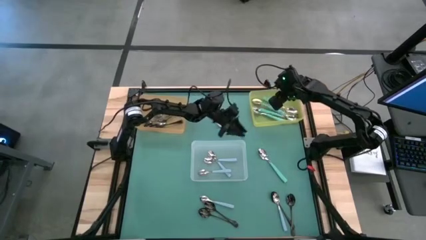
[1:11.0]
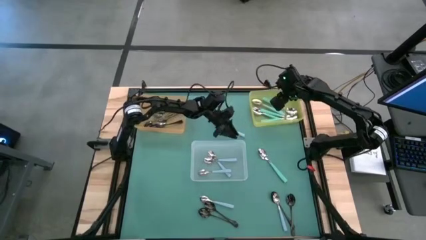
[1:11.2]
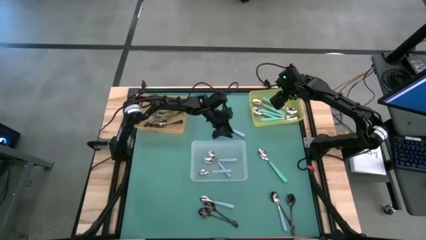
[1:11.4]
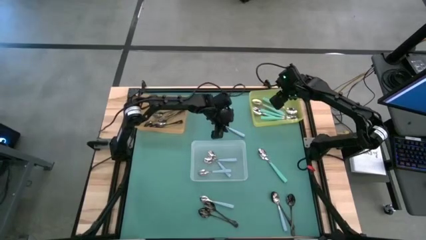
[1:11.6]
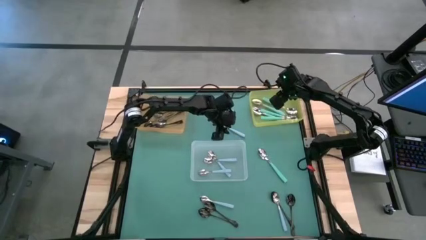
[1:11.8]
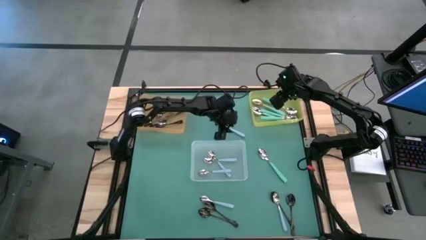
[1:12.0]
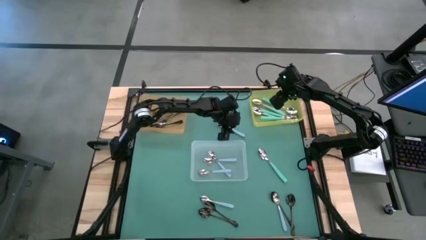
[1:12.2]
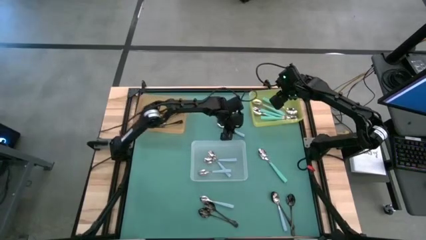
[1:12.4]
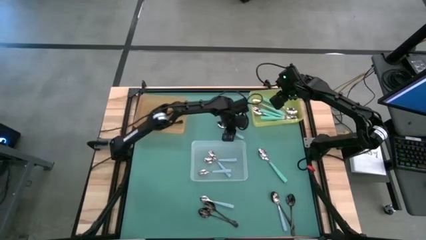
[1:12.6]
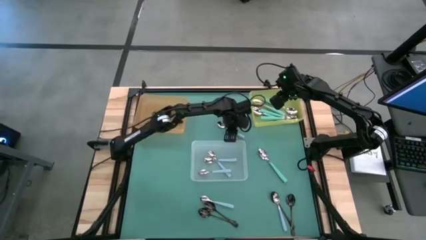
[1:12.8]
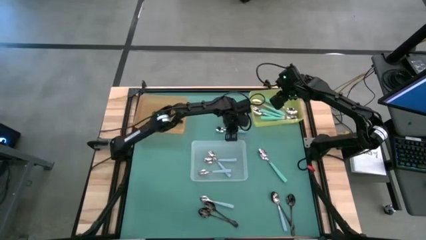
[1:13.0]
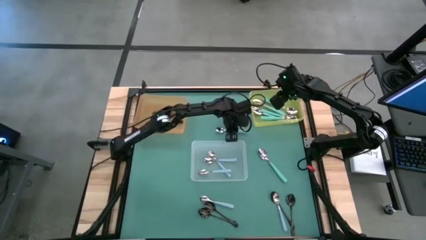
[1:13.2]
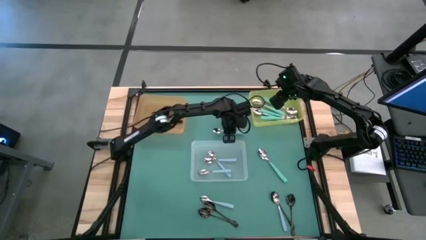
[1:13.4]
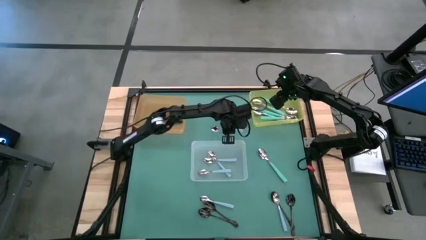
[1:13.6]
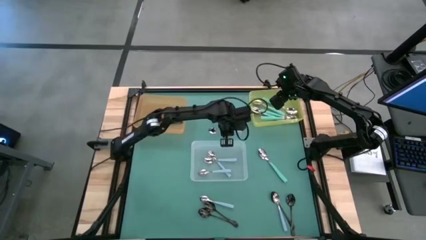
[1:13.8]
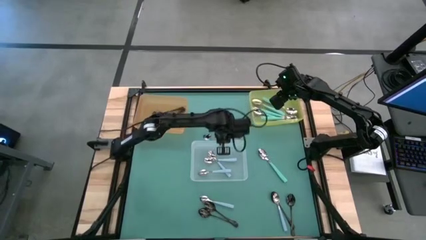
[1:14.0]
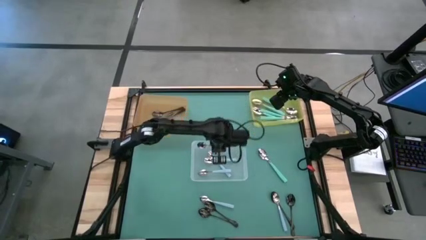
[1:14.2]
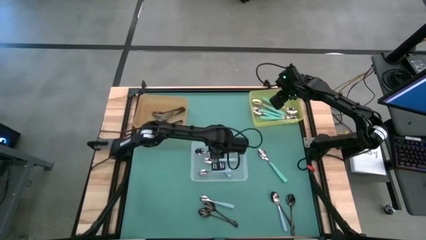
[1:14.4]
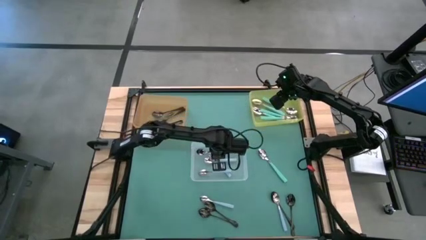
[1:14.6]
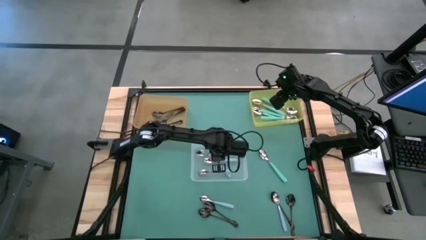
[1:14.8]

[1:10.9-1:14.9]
Task: Sort silverware by color (type)
Put the blue spoon into the white bin

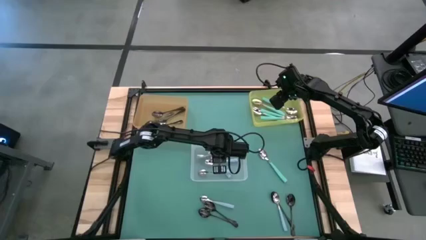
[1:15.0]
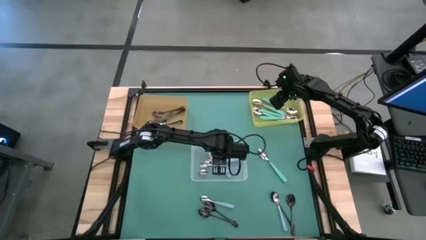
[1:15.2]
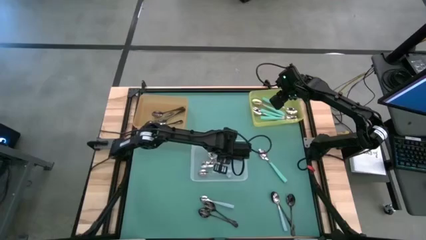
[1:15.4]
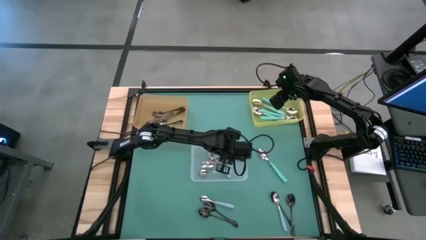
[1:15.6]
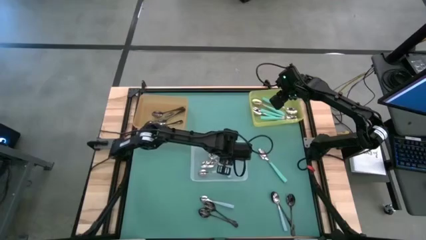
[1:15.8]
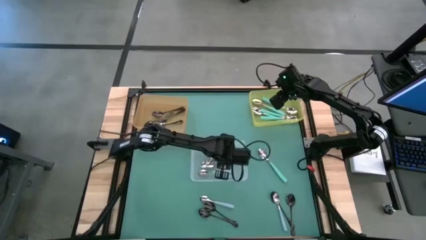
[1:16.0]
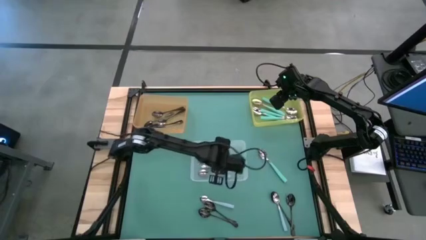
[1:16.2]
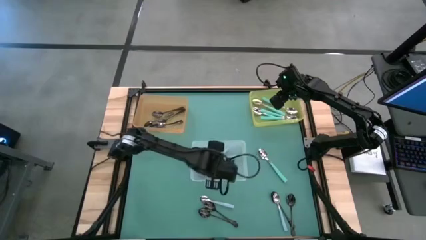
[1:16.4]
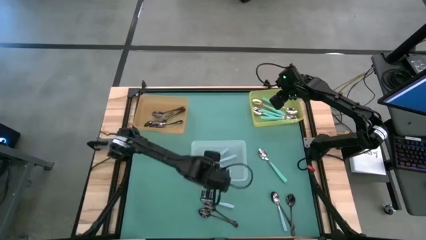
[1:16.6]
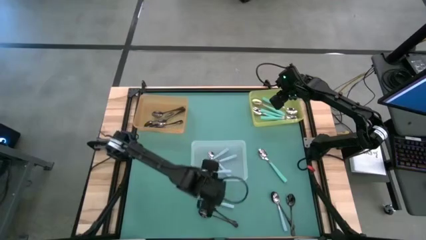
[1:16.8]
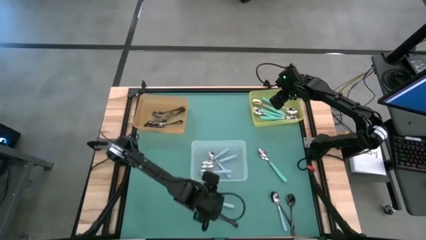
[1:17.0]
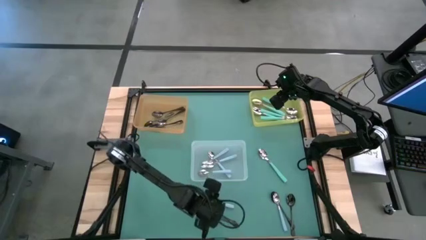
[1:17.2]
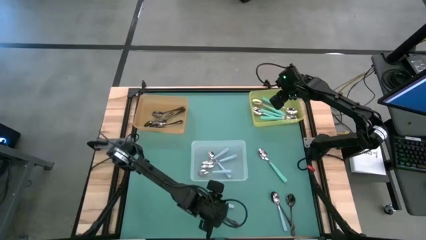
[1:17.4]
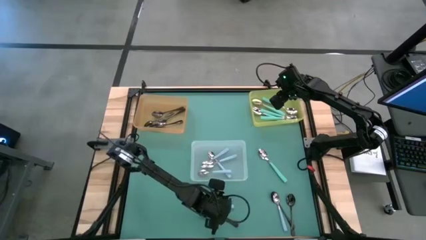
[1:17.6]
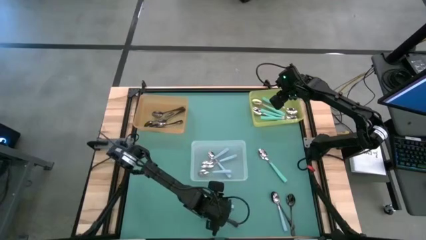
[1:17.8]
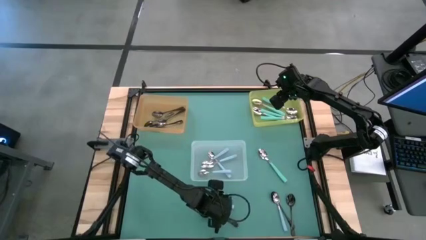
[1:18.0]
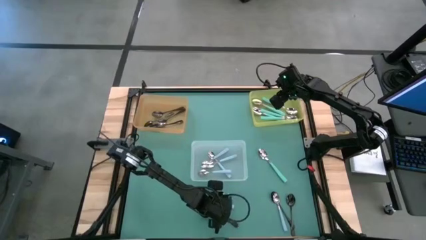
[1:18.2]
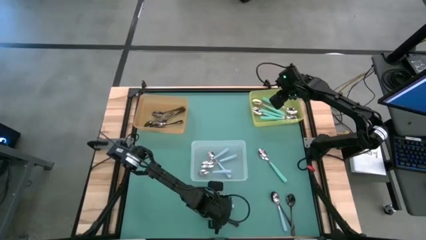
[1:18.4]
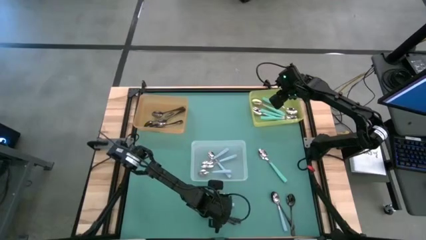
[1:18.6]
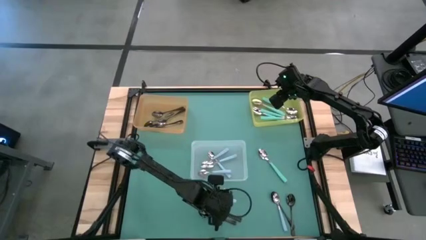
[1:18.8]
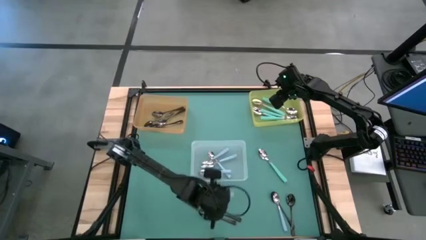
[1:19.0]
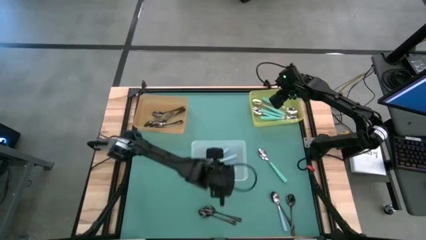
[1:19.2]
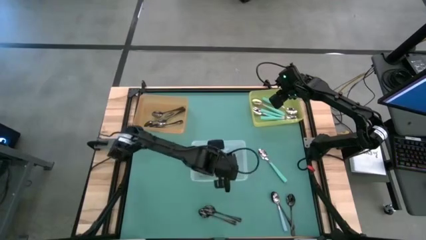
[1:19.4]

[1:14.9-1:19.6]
Put the blue spoon into the white bin

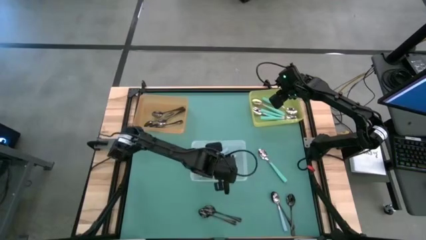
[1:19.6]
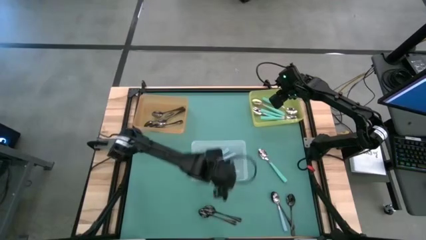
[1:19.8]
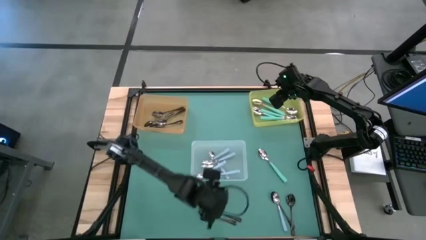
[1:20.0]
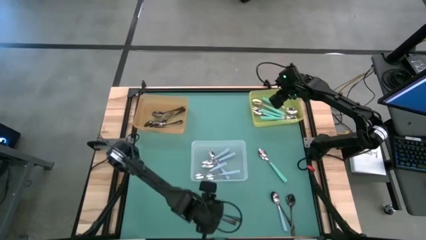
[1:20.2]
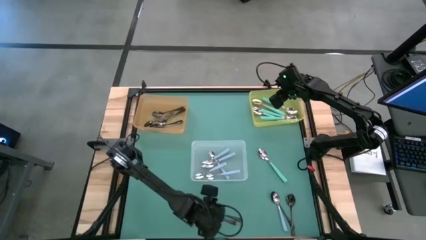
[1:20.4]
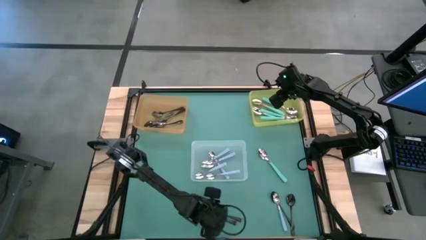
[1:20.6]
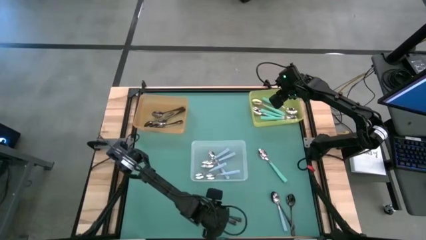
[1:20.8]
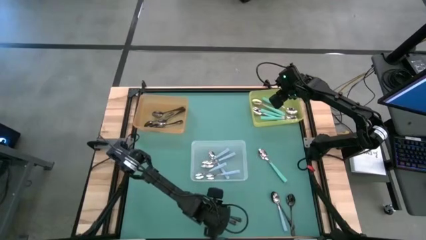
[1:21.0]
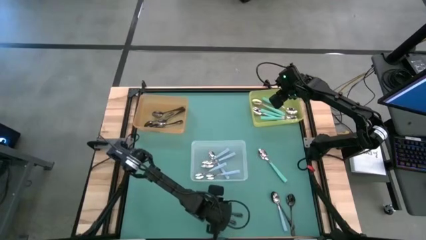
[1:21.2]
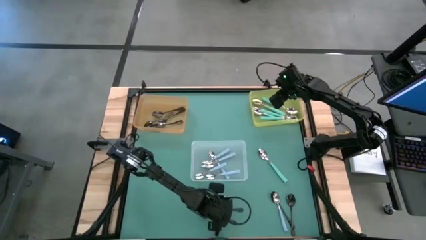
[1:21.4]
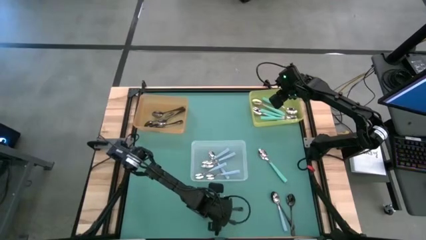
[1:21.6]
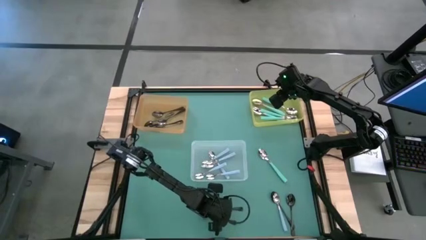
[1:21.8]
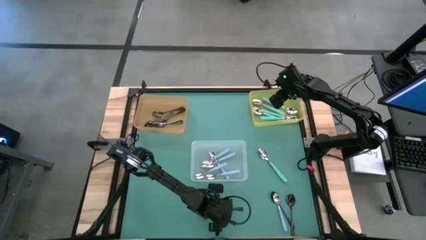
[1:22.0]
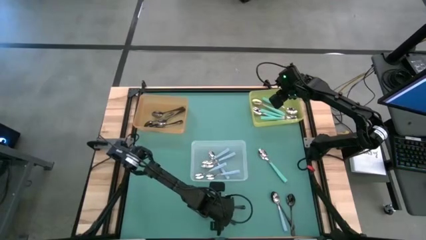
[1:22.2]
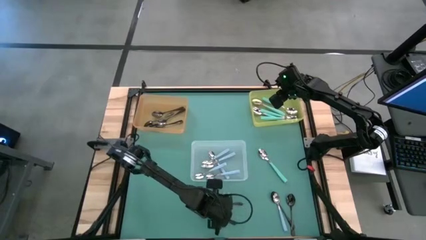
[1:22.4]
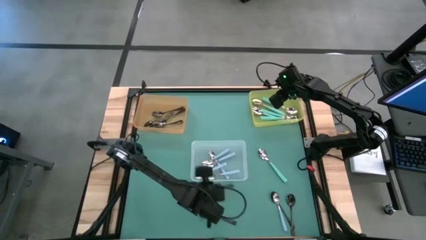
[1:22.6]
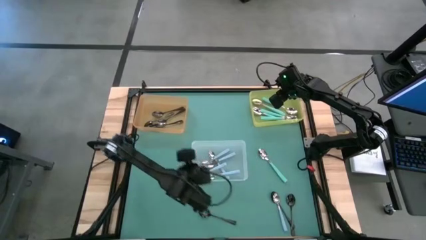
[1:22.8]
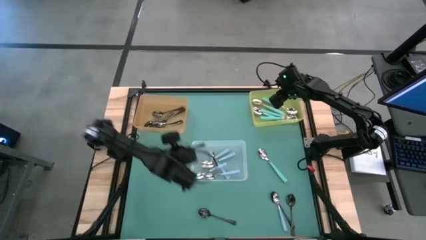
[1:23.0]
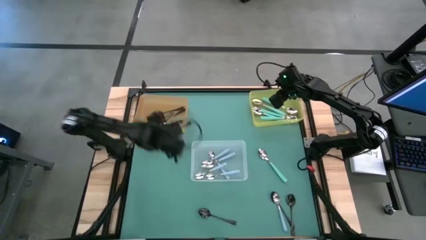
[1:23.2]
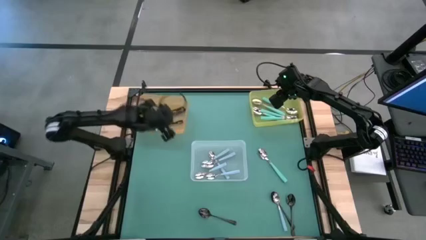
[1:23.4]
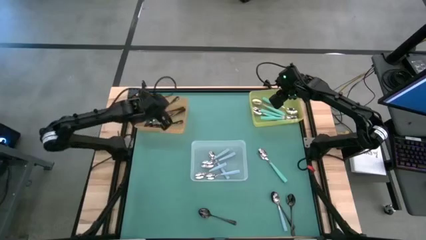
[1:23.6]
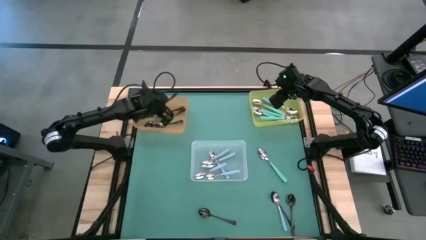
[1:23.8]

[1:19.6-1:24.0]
Put the black spoon into the orange bin

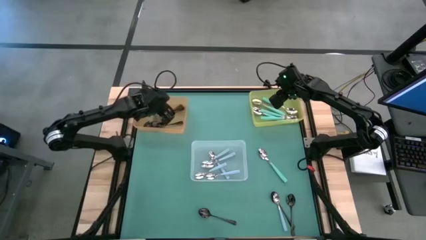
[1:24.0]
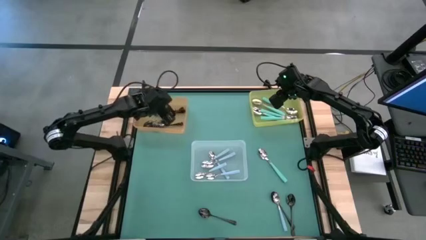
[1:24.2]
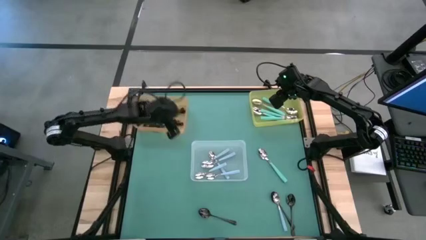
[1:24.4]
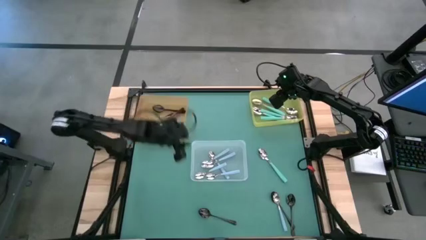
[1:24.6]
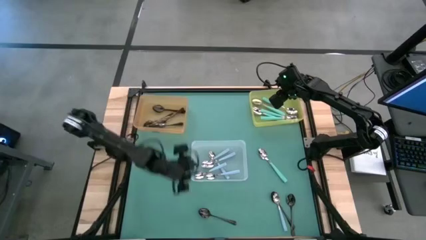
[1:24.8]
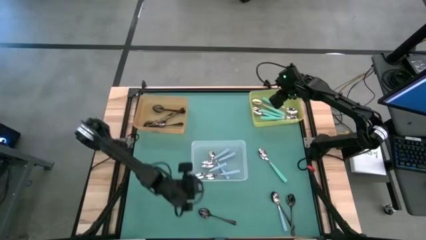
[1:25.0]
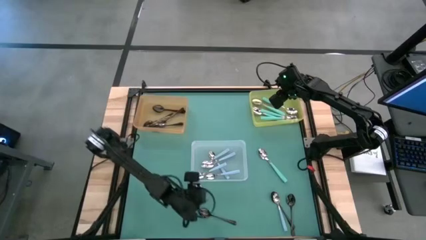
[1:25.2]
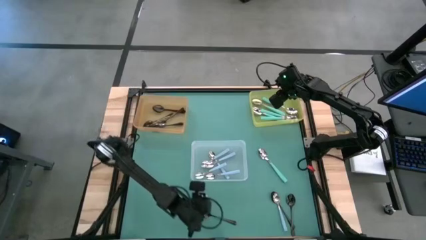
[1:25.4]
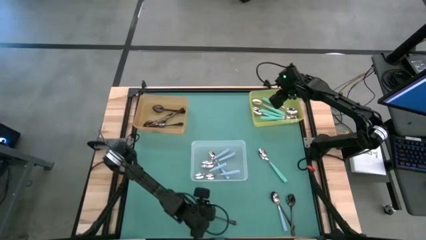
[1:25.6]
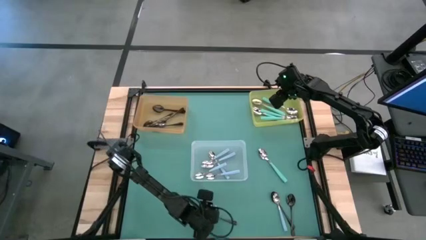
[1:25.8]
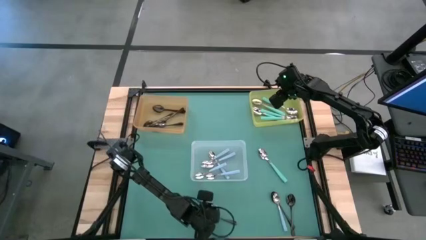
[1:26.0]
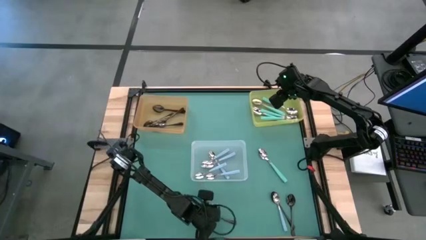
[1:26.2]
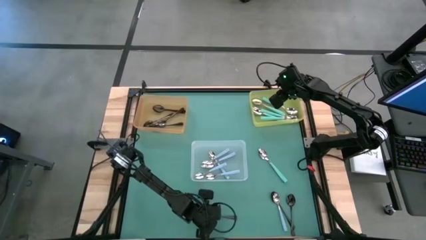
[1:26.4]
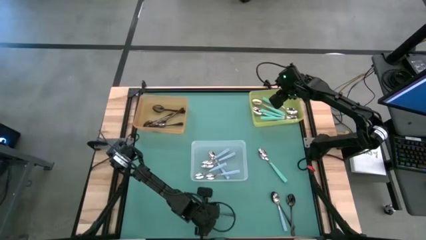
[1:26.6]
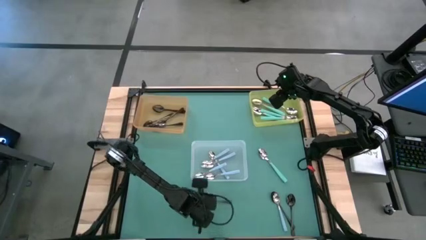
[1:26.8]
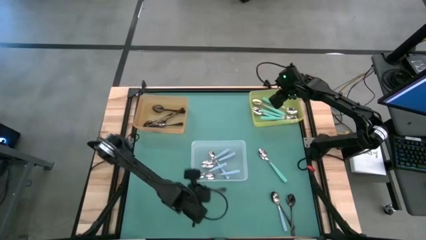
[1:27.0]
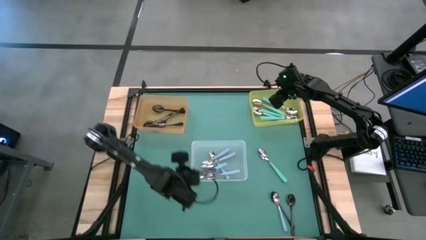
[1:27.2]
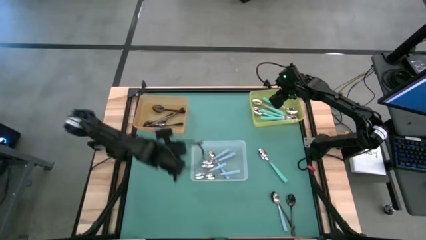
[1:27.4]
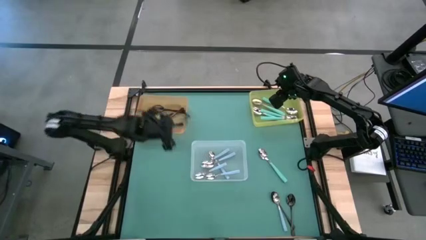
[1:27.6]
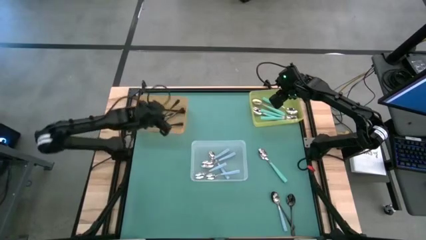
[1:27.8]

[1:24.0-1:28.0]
Put the black spoon into the orange bin
